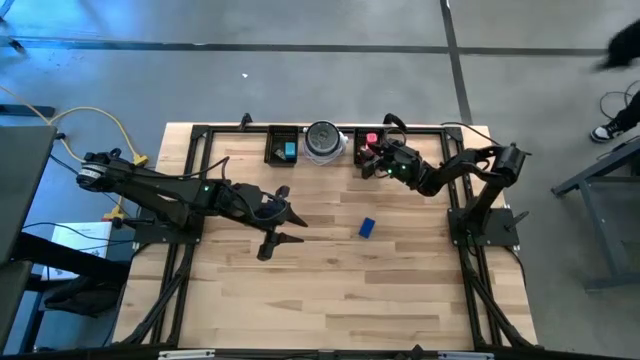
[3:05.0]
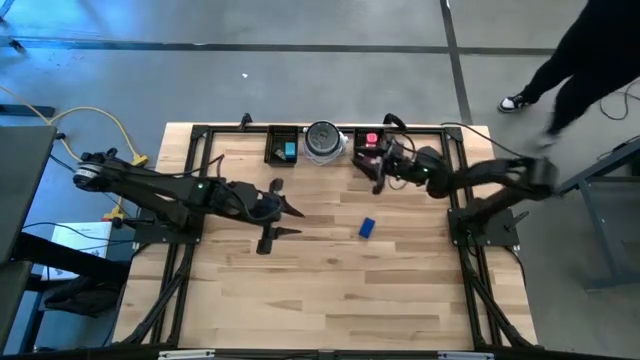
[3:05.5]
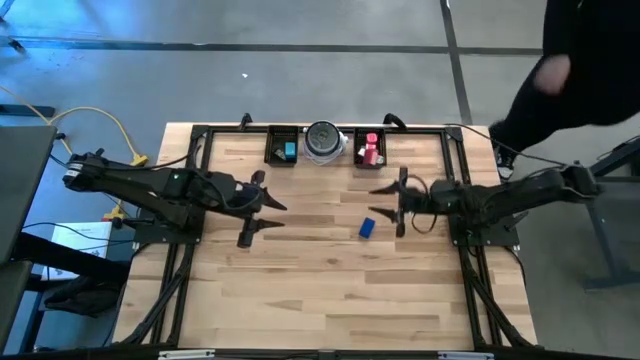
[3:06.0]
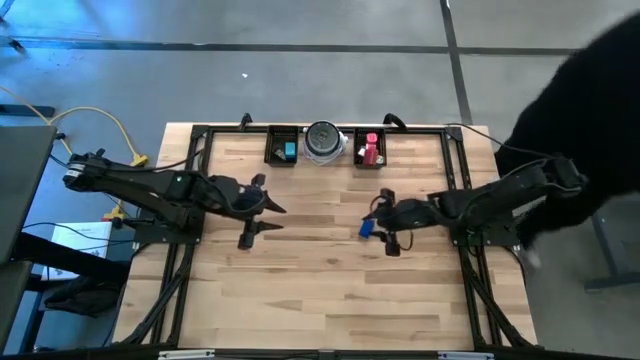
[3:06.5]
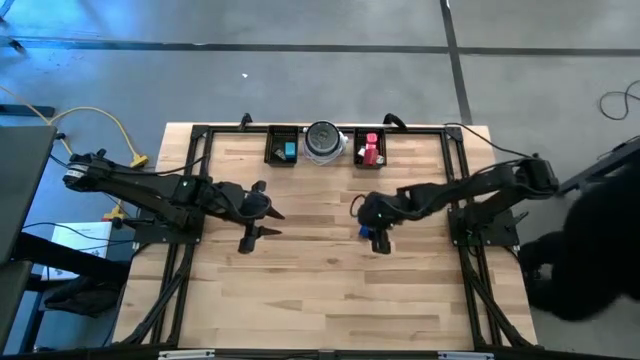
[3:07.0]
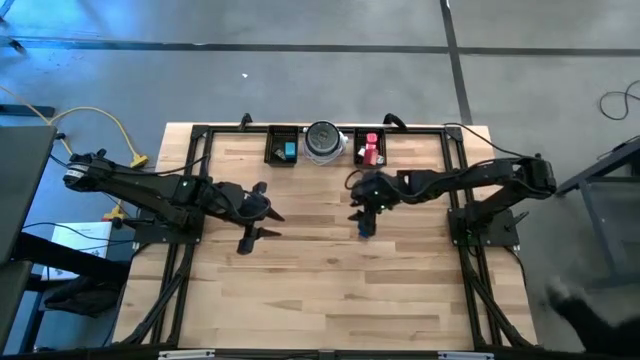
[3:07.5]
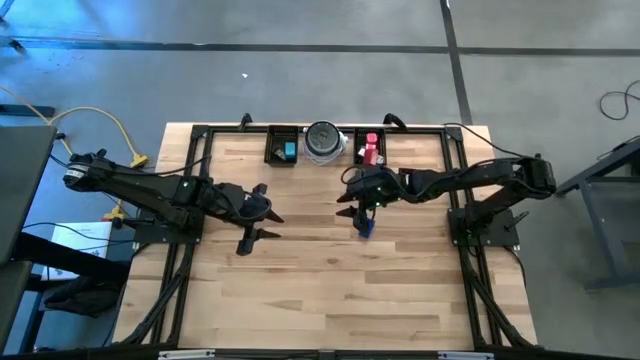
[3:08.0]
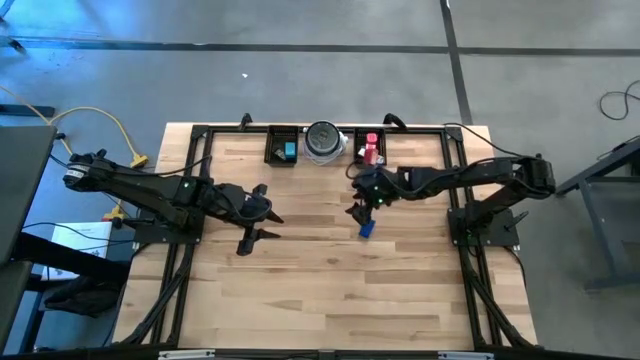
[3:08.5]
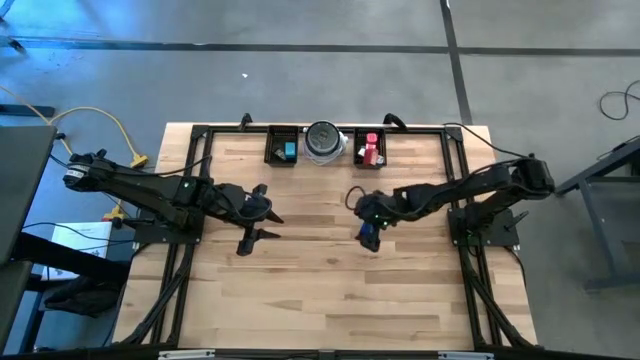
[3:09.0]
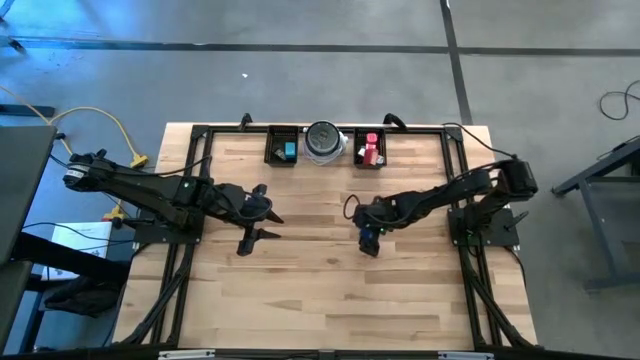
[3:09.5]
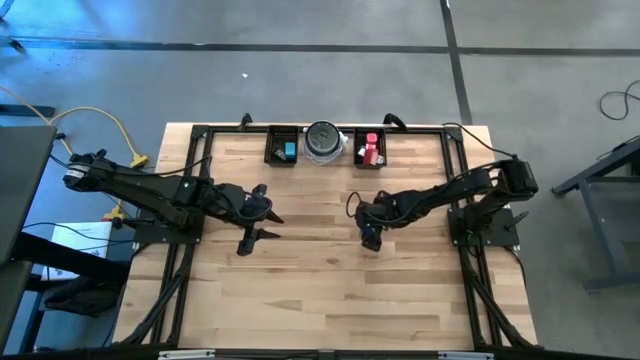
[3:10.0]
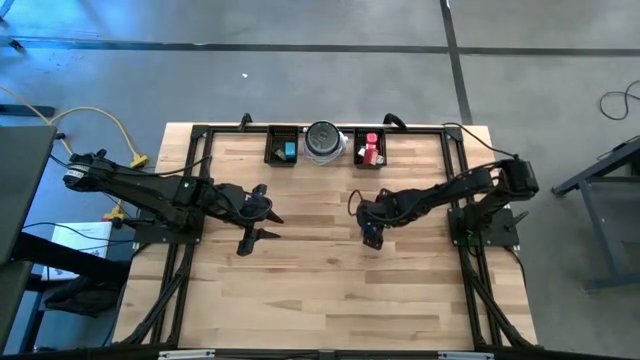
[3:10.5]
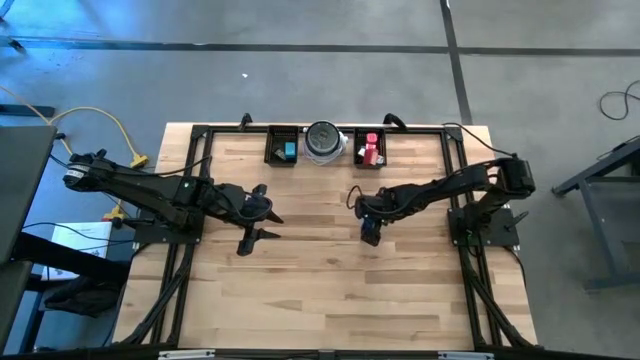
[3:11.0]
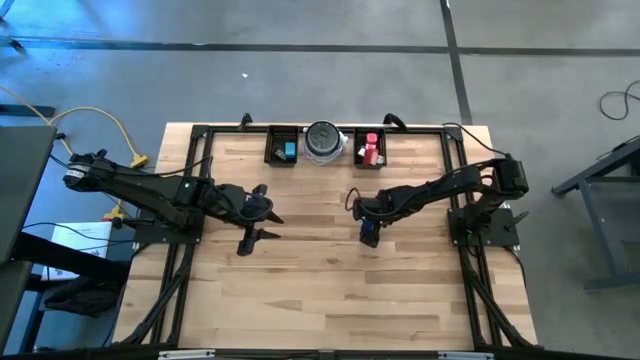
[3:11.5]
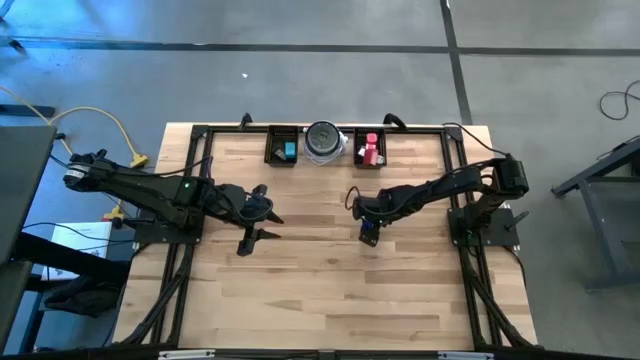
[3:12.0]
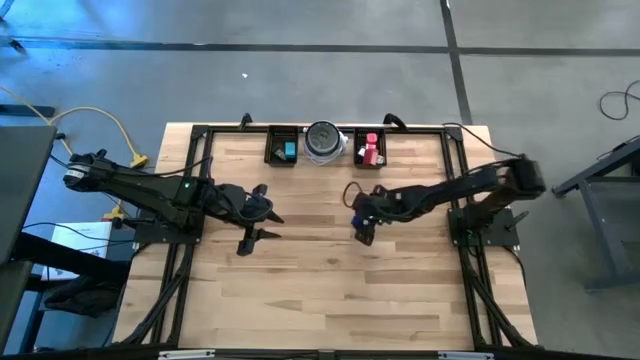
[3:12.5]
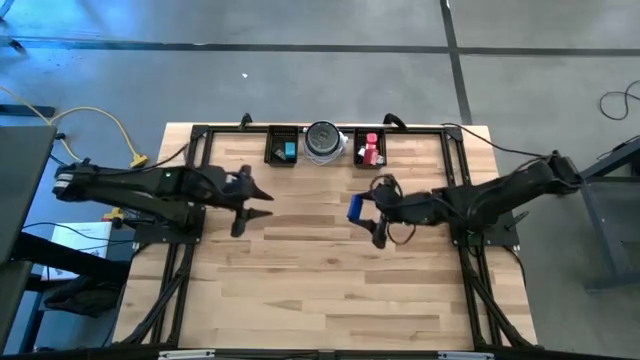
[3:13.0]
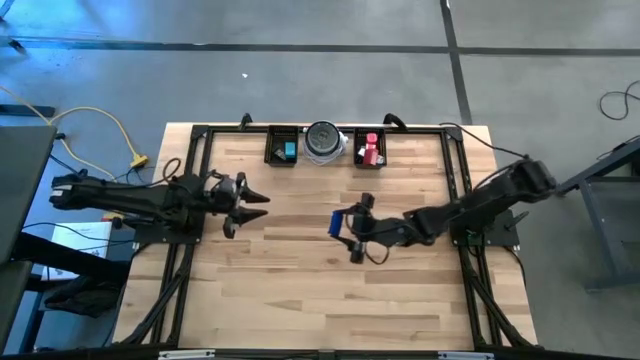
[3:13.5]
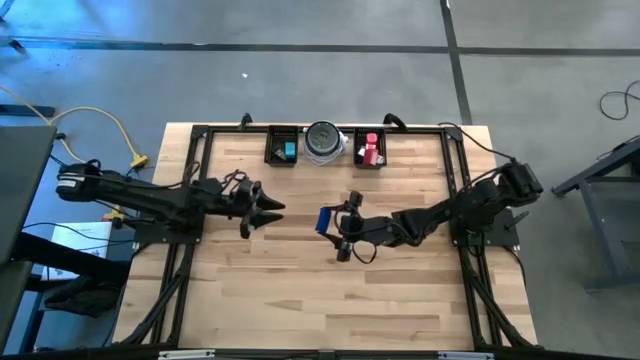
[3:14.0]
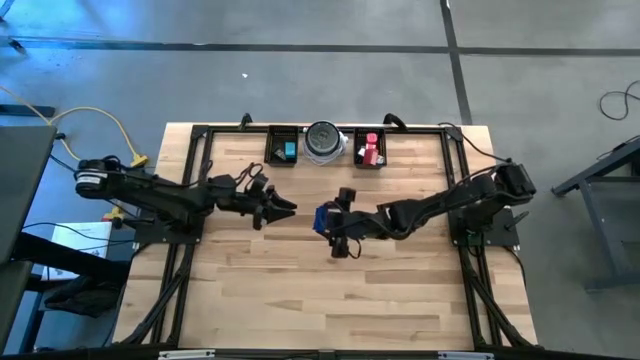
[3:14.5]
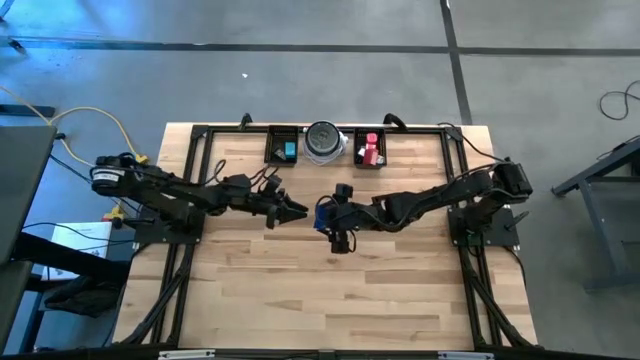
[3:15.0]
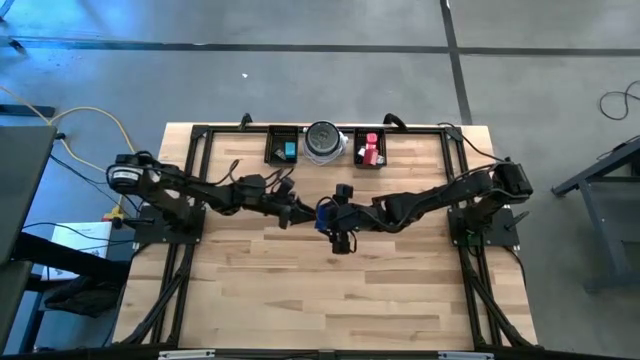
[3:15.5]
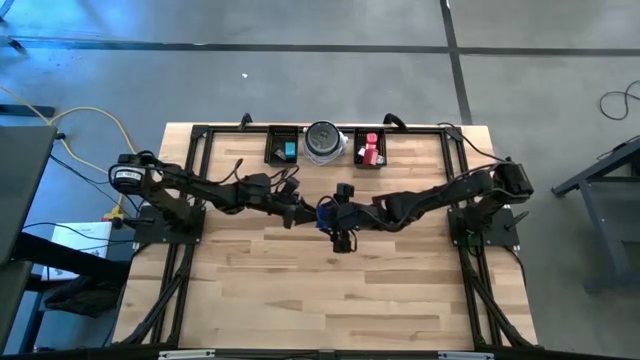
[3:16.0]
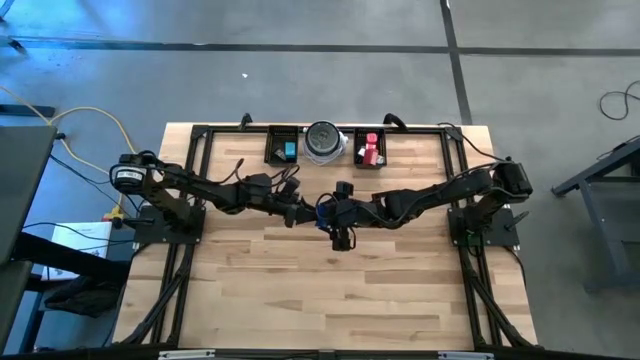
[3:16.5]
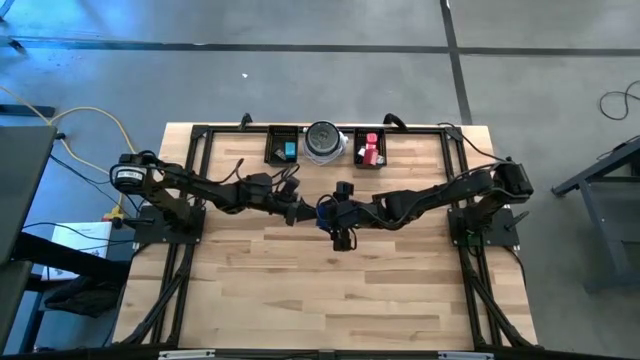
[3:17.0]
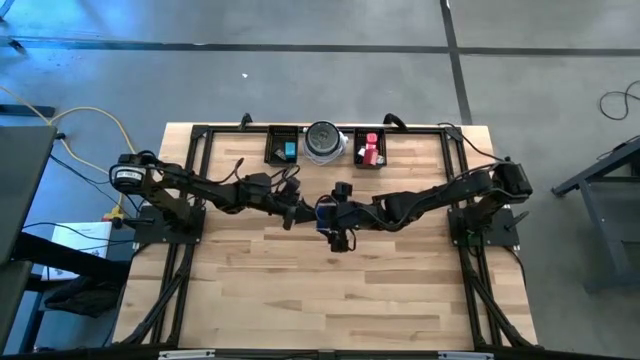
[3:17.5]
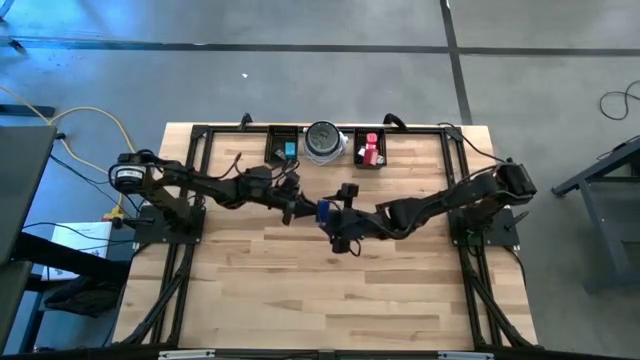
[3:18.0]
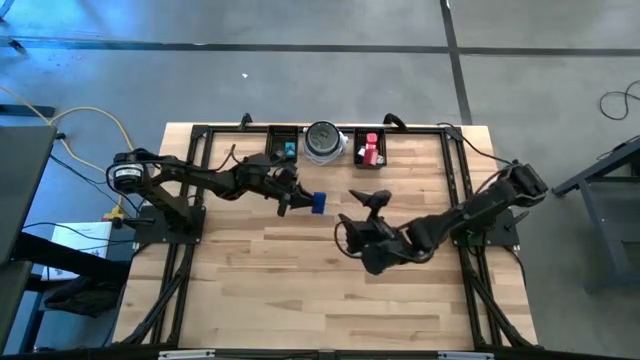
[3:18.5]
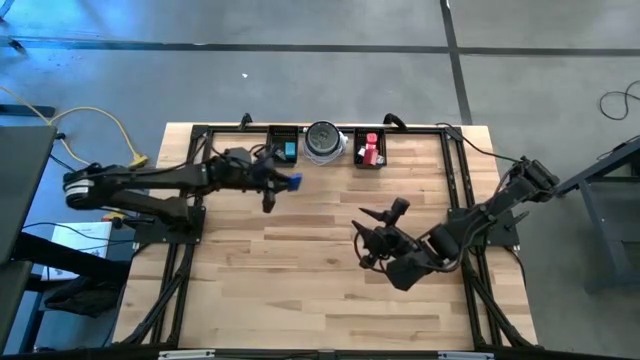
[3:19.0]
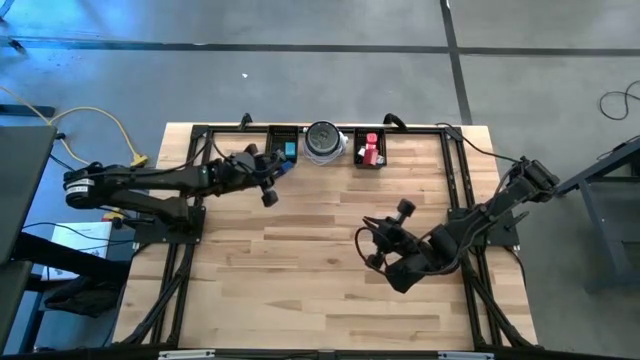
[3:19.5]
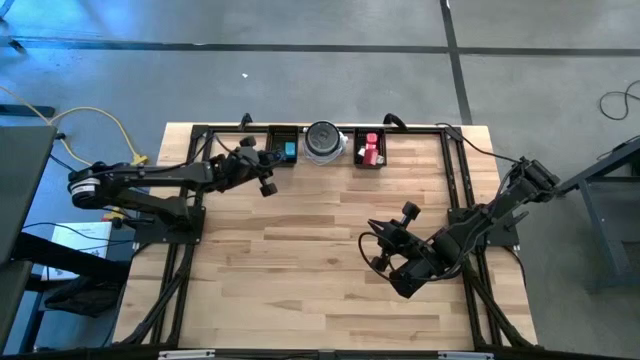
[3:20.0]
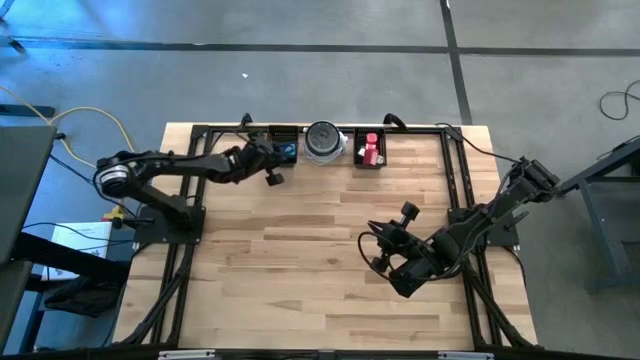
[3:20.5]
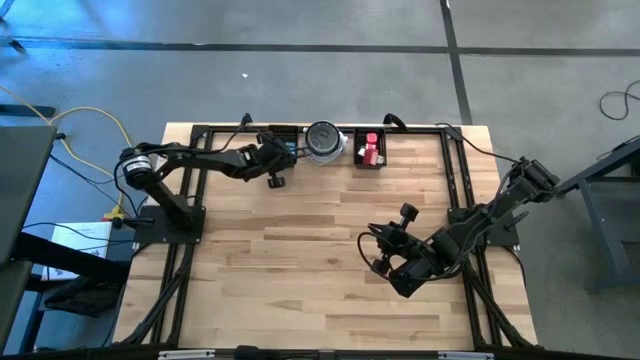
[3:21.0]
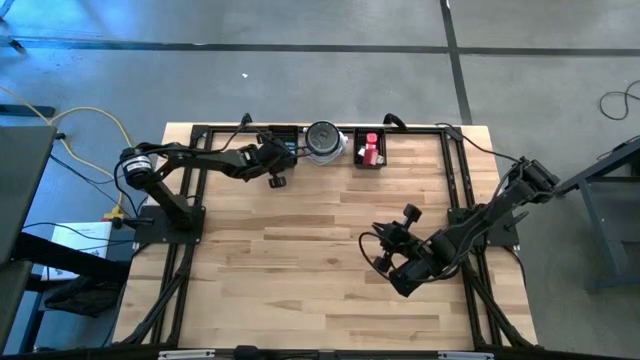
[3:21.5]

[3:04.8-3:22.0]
Task: Pick & Place Office items
Put the blue timer into the left black basket

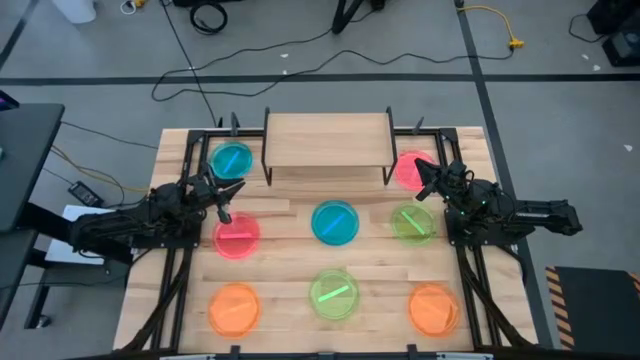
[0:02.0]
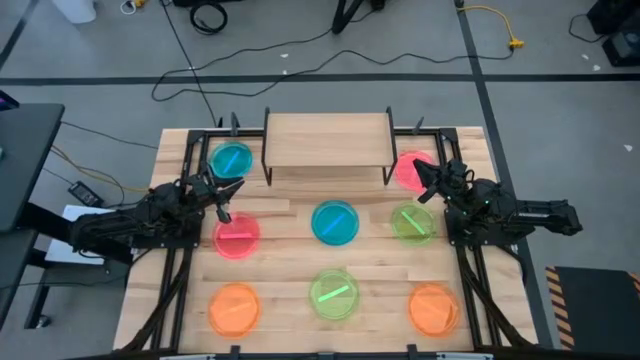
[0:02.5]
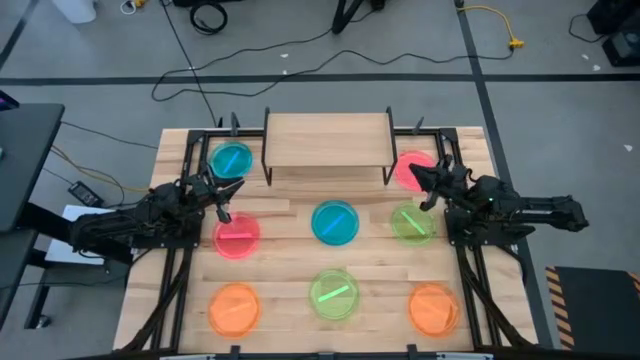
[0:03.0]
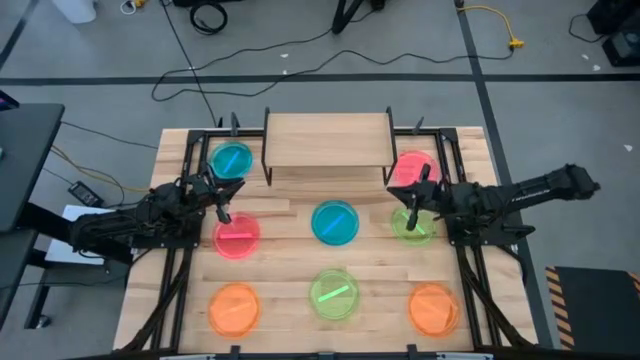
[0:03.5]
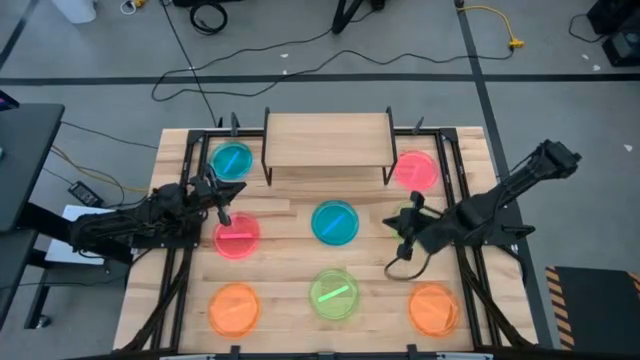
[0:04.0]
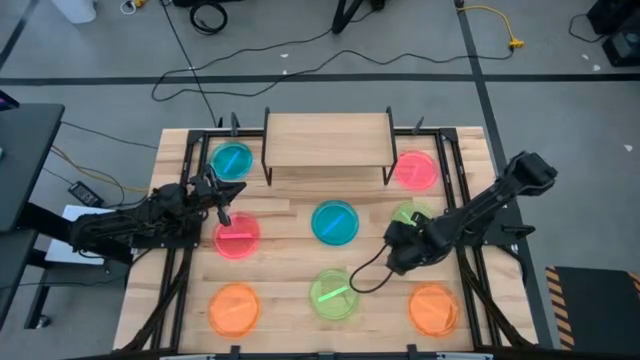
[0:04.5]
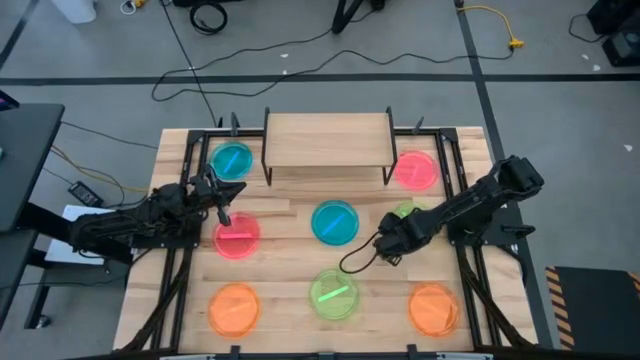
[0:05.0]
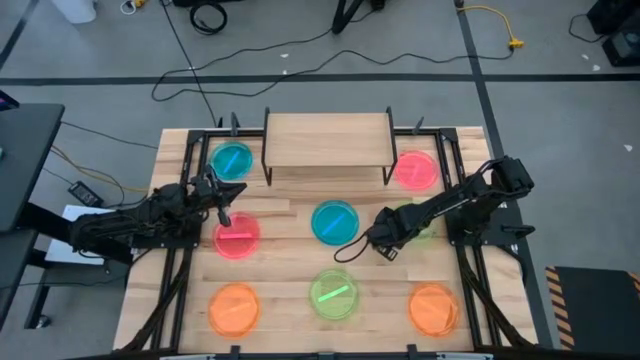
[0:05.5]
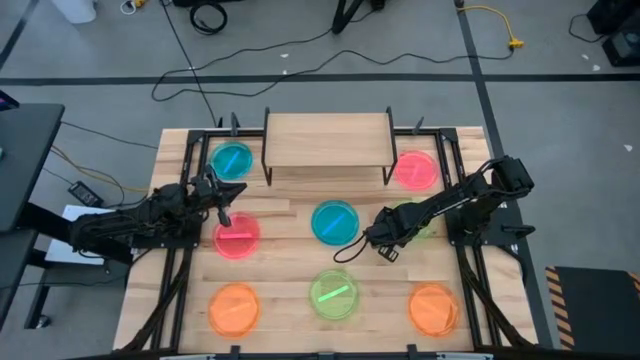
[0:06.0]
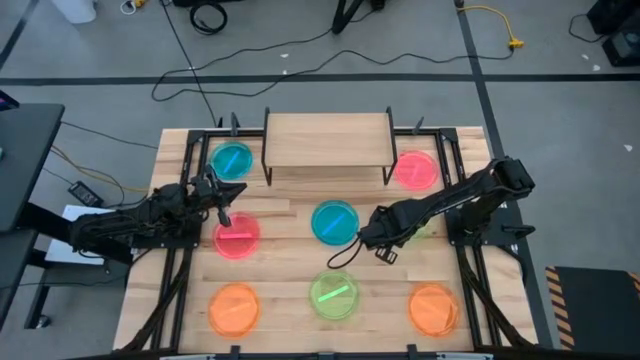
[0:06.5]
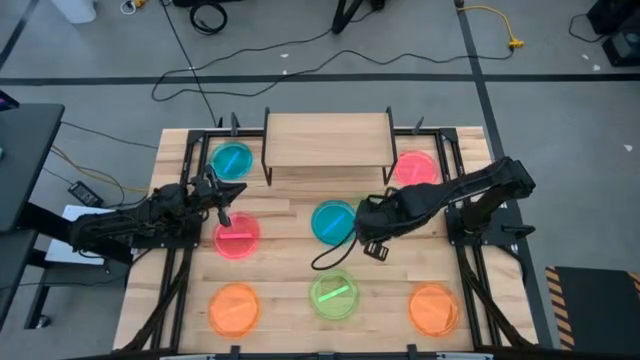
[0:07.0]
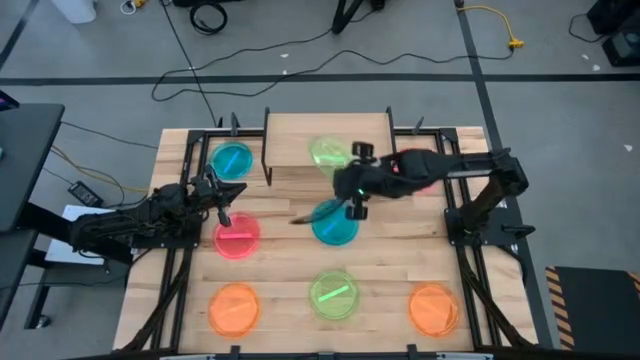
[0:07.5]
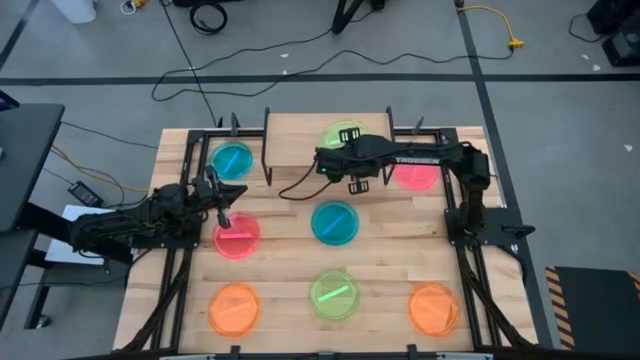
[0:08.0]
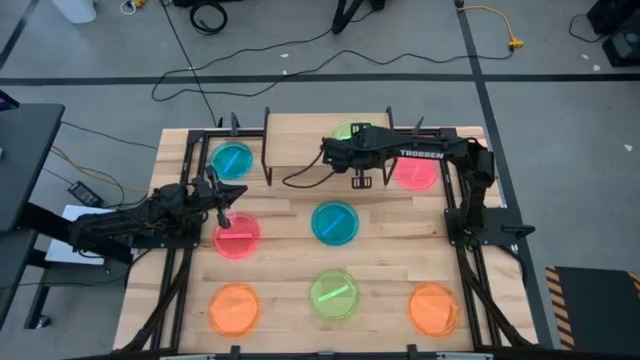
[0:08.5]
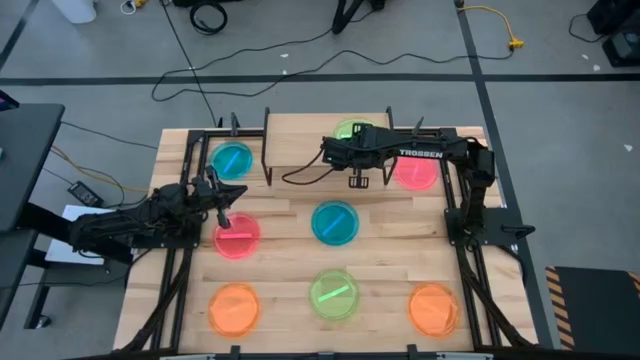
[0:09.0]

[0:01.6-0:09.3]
Task: Place and stack plates onto a shelf
Put the top green plate on the shelf
